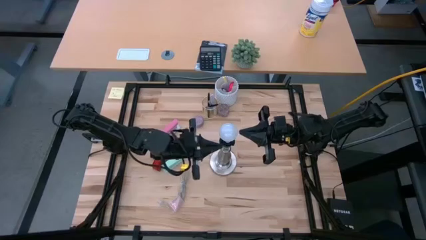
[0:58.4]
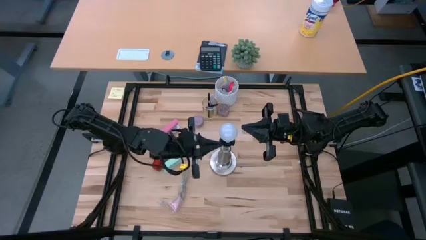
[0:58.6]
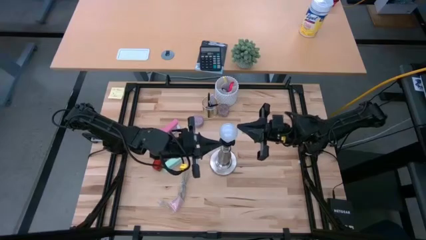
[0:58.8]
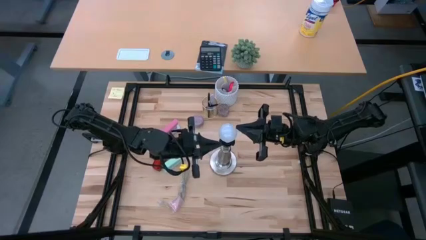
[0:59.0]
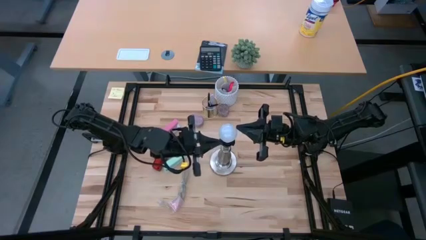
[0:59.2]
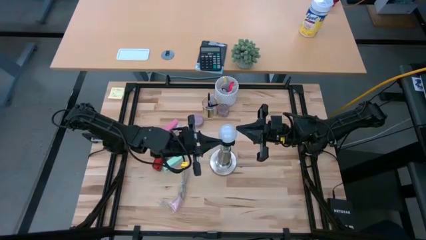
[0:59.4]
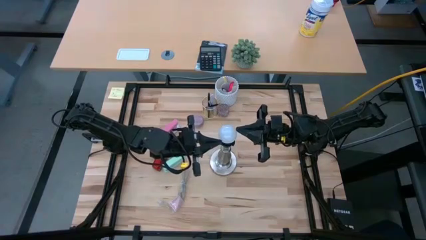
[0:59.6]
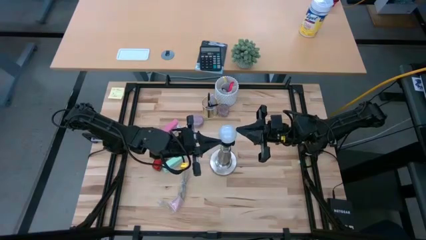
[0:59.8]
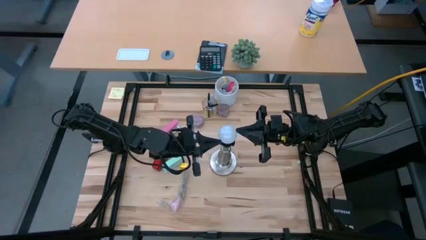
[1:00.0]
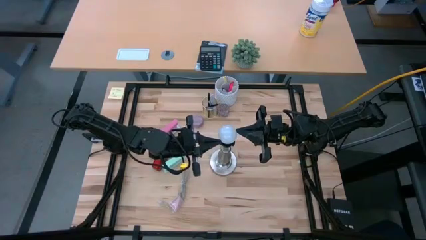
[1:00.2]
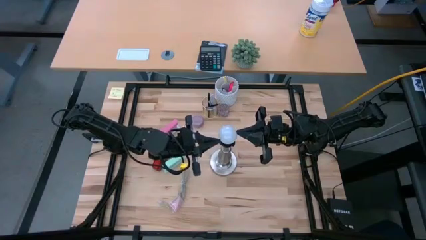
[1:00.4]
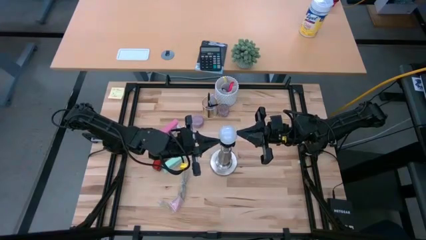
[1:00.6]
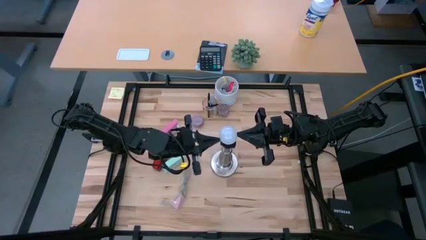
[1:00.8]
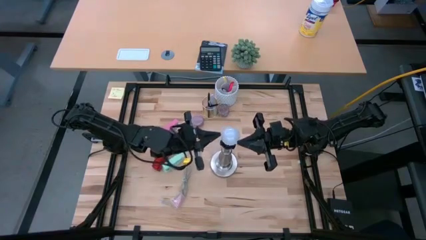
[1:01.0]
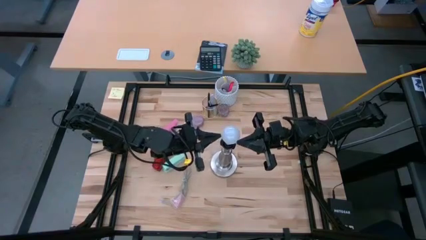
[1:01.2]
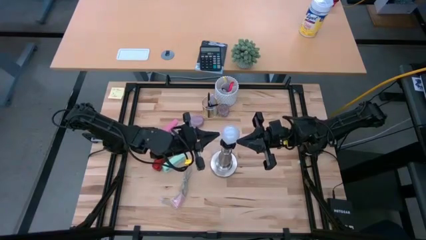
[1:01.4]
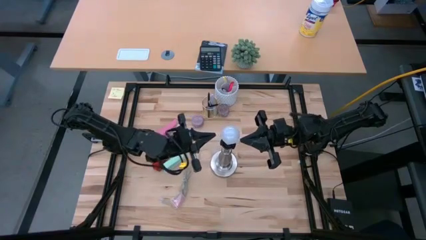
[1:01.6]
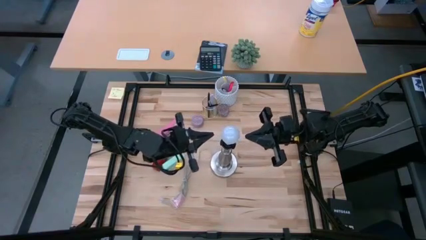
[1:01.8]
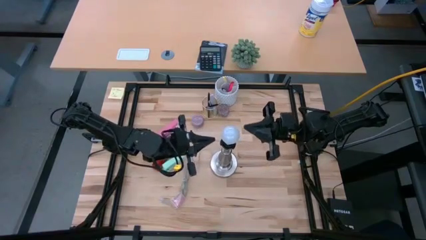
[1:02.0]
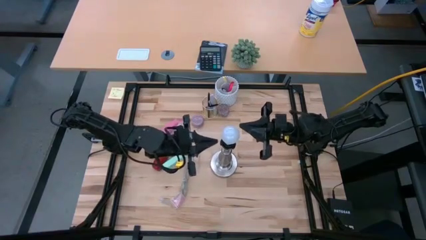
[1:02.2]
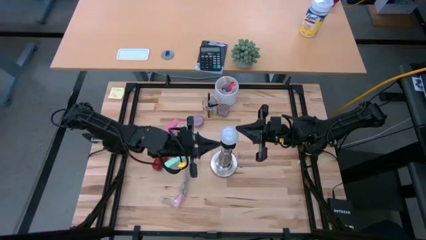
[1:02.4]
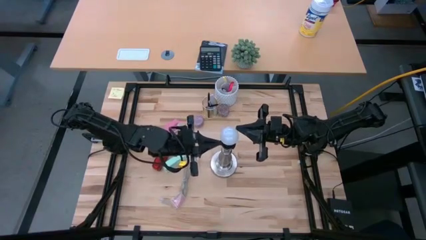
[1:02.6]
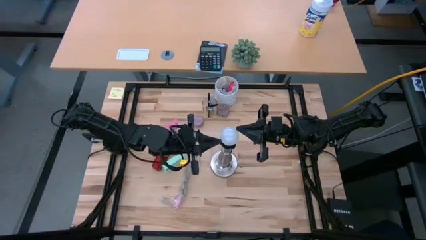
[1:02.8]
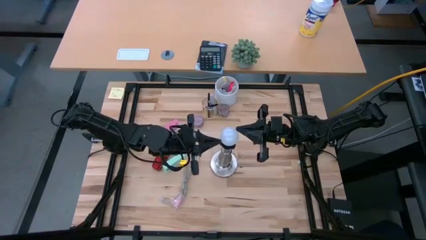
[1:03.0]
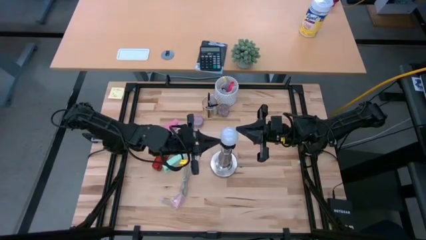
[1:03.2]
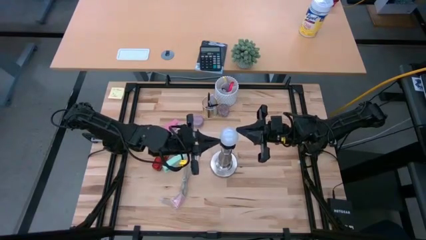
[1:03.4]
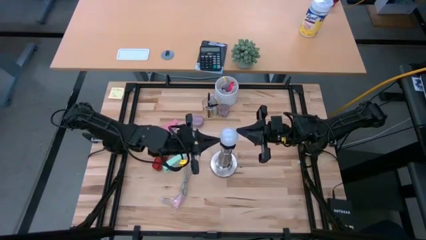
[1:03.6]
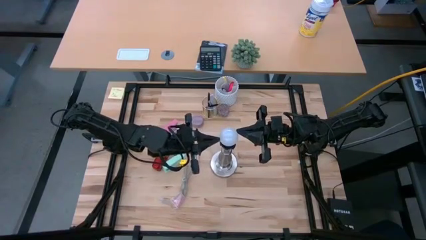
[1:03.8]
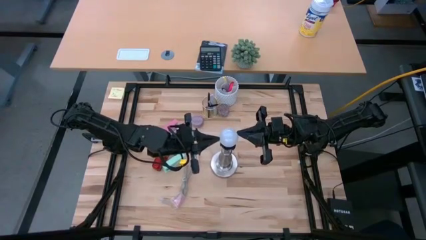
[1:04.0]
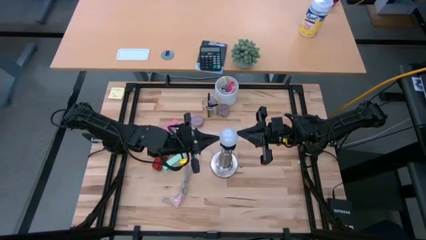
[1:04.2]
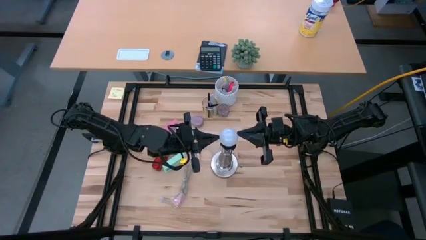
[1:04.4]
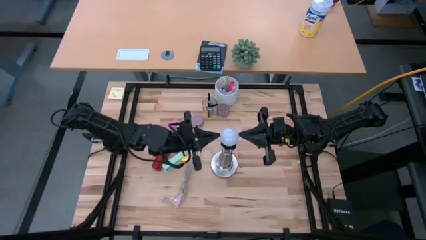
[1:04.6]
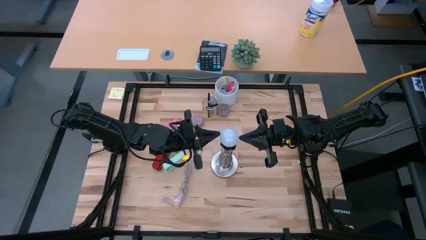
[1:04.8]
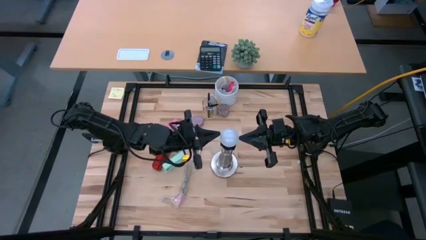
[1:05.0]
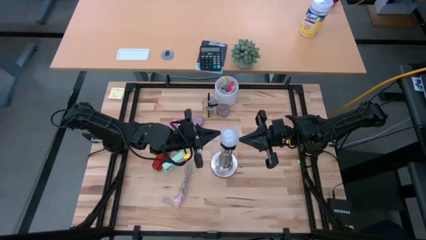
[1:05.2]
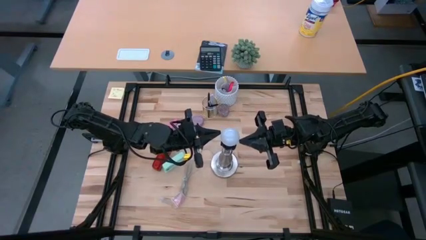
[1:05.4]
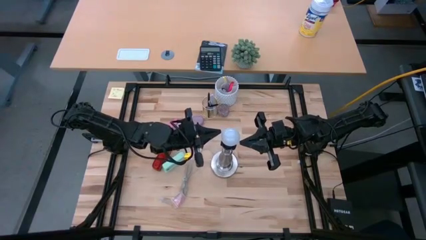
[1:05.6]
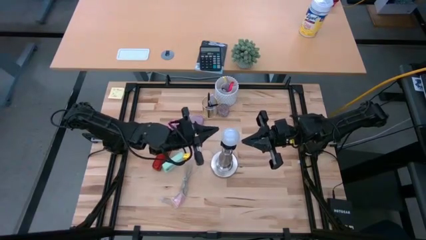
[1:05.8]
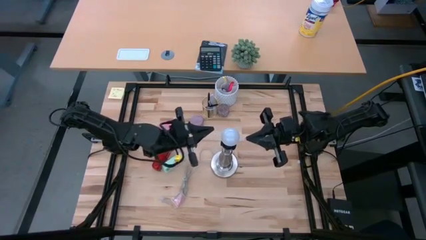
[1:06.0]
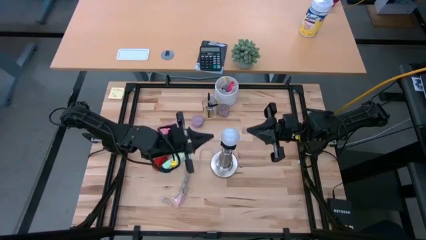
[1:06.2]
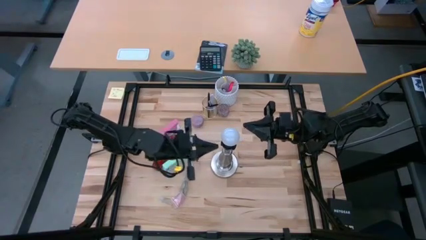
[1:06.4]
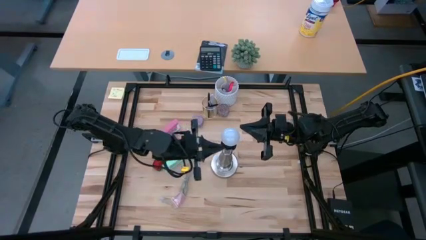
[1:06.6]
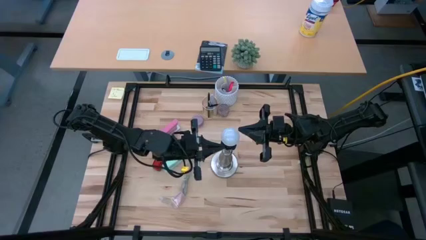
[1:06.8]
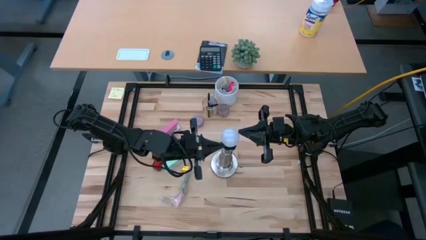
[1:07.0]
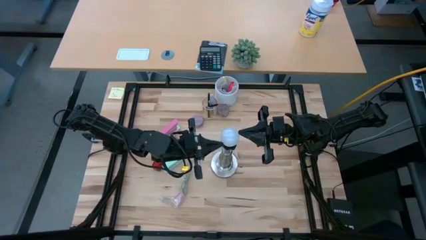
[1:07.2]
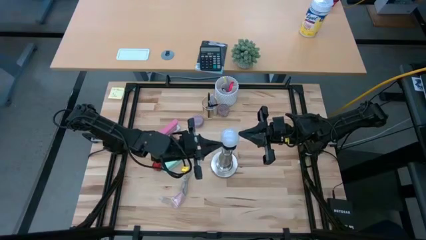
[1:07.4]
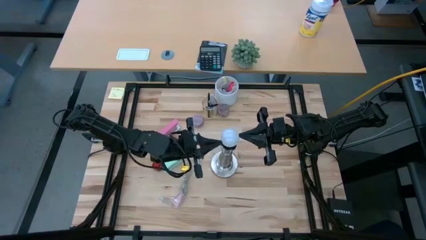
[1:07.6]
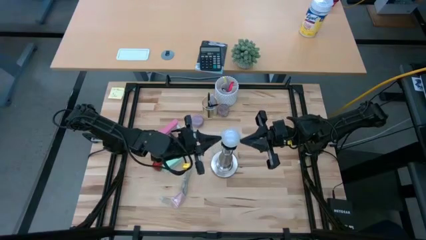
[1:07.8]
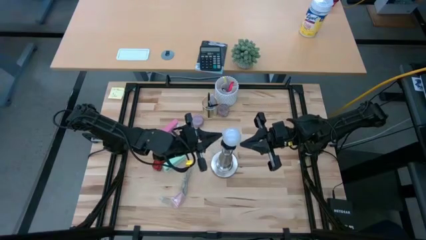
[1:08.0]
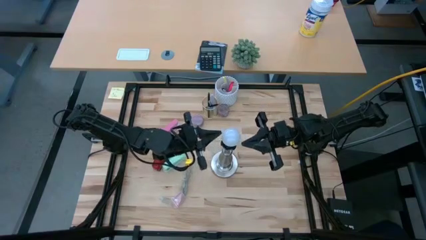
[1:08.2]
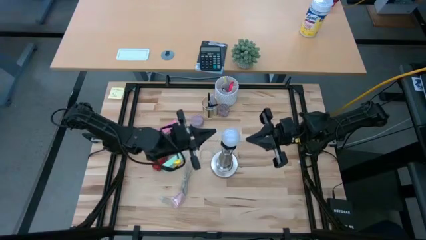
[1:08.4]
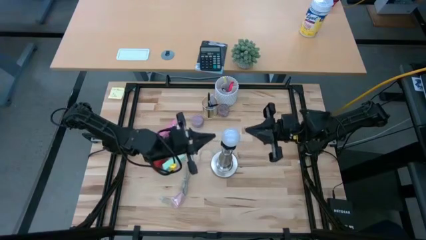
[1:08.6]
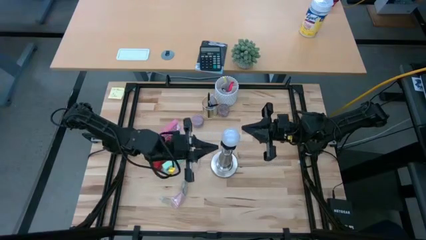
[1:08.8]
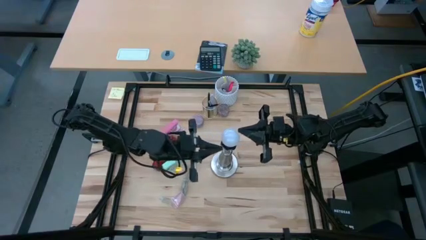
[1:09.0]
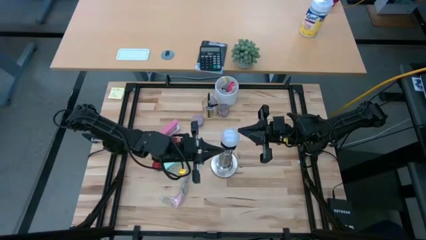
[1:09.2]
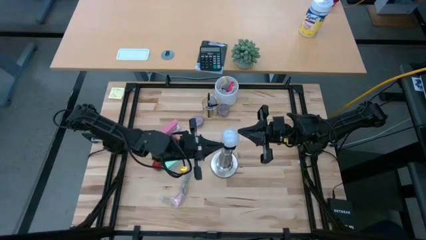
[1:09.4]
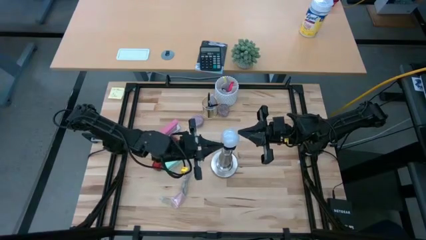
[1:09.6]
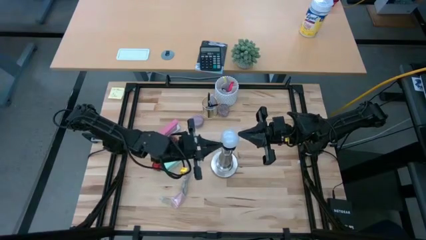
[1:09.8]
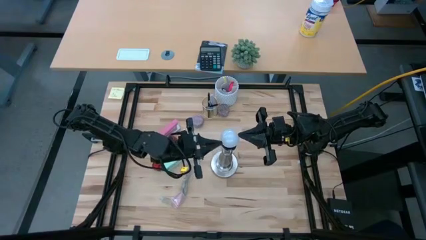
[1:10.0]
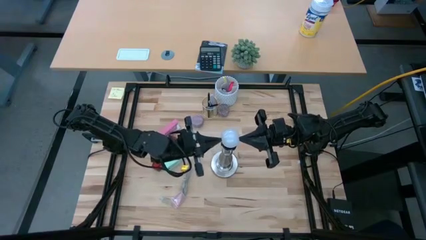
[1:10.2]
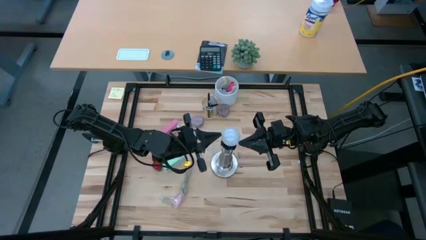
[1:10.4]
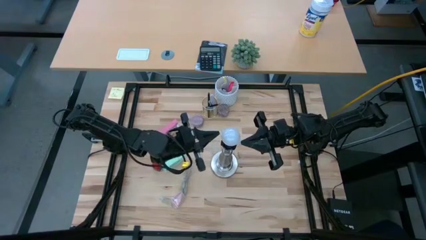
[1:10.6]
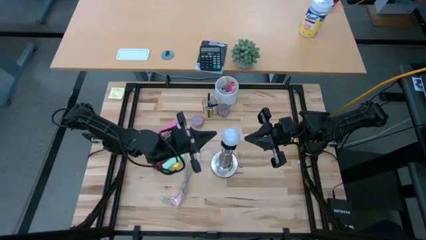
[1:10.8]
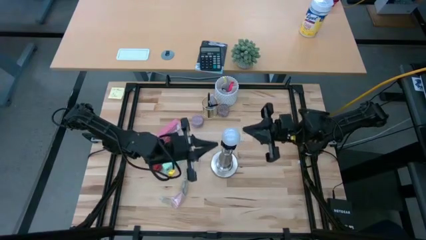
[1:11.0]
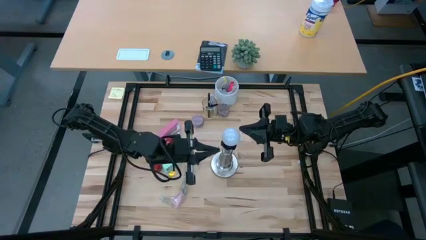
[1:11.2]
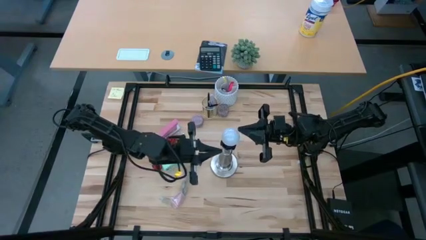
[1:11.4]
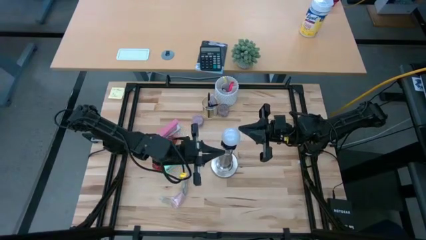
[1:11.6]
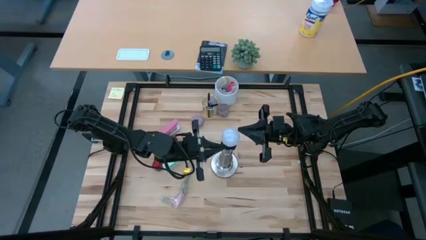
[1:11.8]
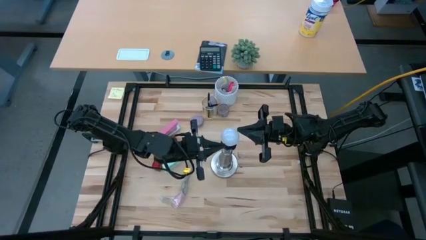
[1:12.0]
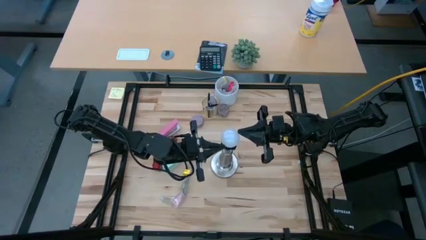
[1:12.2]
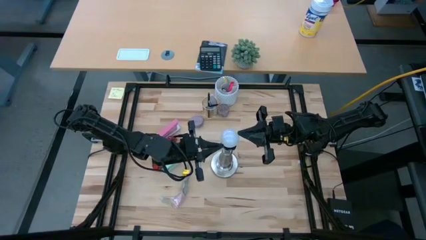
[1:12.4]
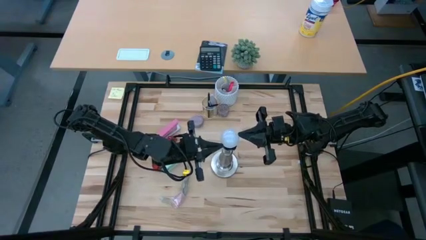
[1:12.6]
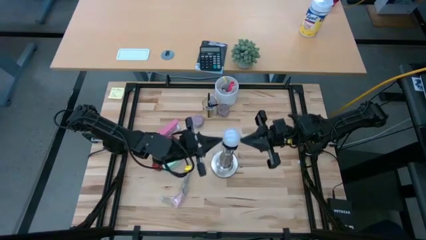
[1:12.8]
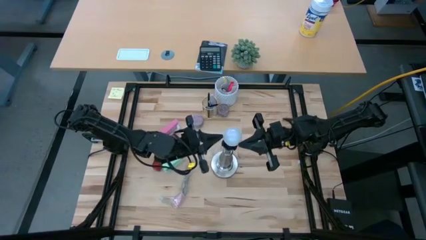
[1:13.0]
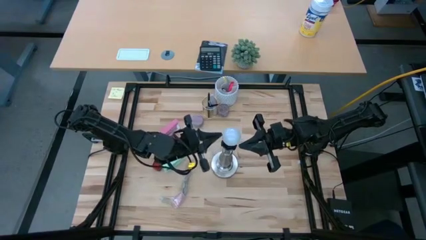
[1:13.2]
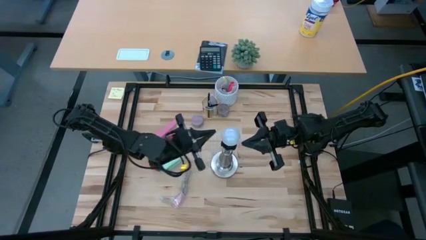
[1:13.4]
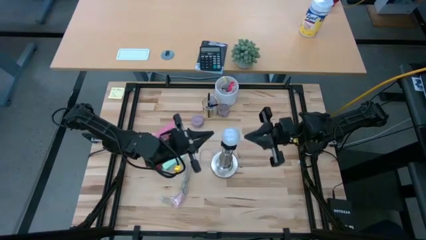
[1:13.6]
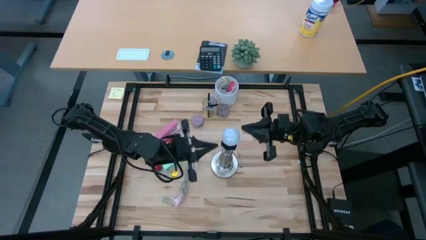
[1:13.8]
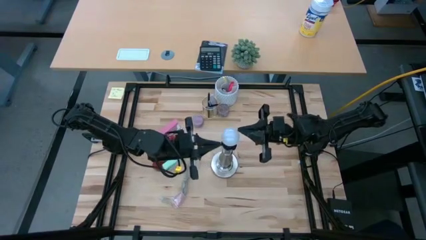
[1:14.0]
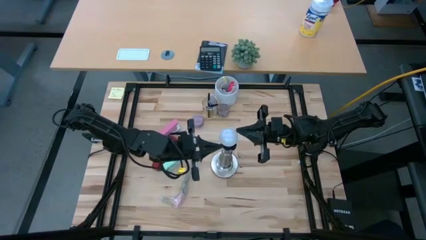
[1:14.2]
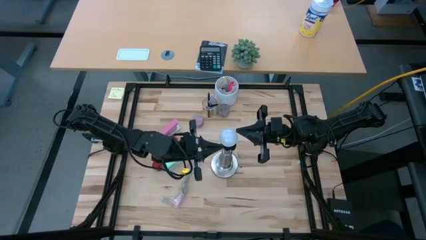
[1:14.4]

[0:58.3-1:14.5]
Task: Screw lightbulb
Insert the lightbulb to the lamp
